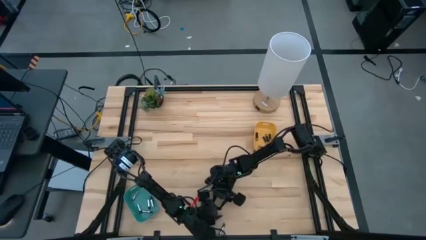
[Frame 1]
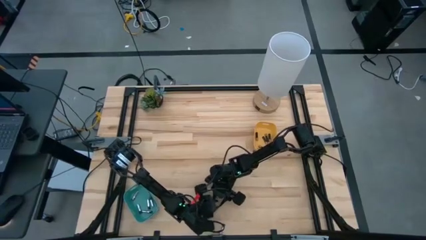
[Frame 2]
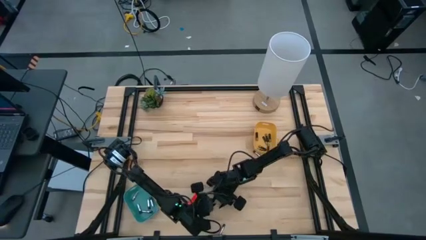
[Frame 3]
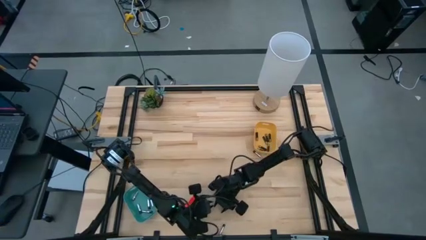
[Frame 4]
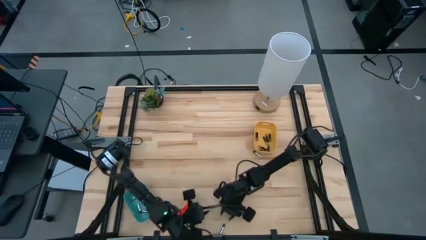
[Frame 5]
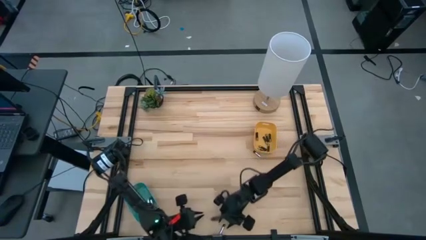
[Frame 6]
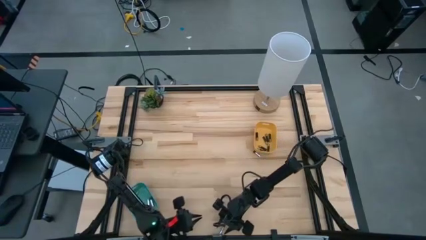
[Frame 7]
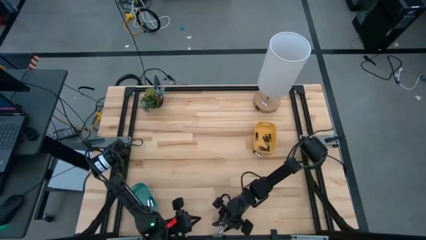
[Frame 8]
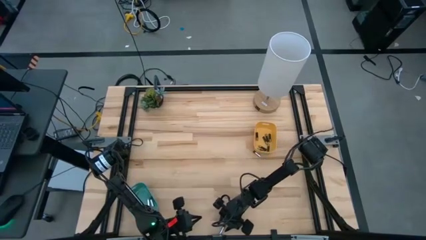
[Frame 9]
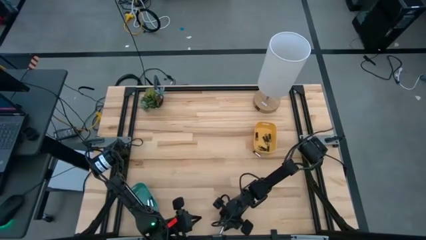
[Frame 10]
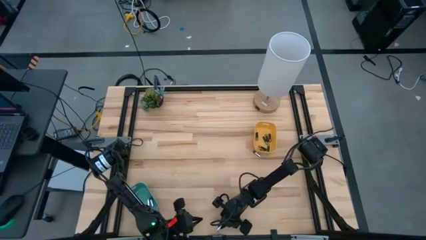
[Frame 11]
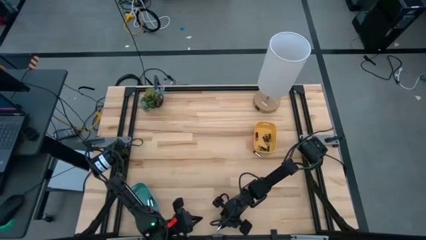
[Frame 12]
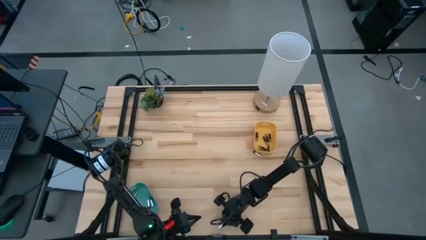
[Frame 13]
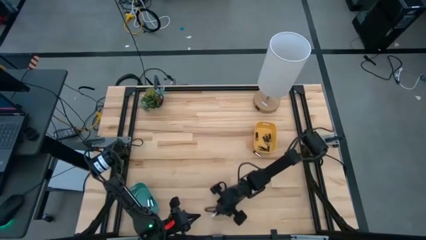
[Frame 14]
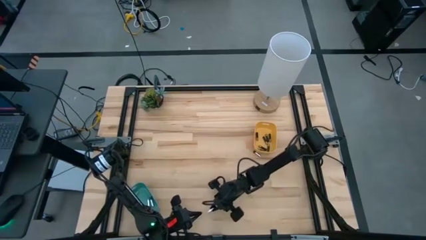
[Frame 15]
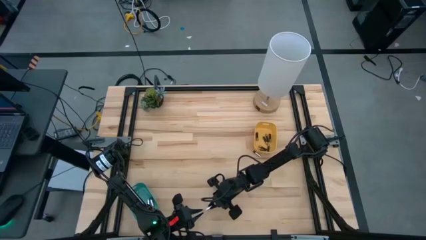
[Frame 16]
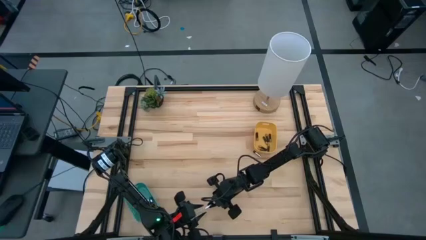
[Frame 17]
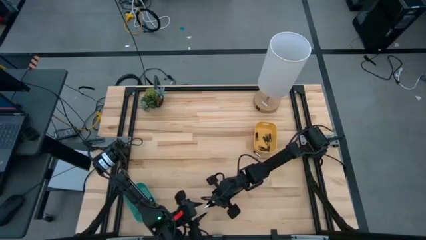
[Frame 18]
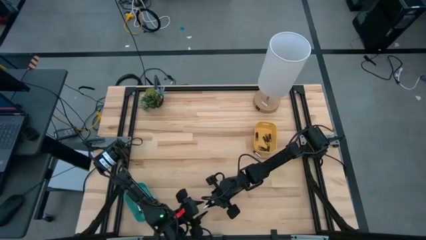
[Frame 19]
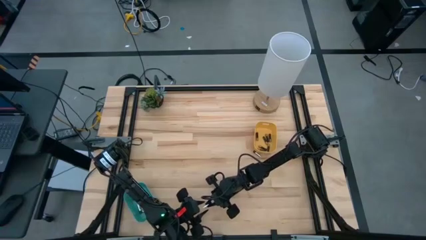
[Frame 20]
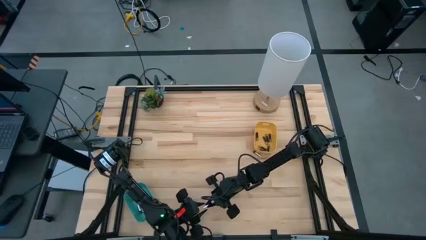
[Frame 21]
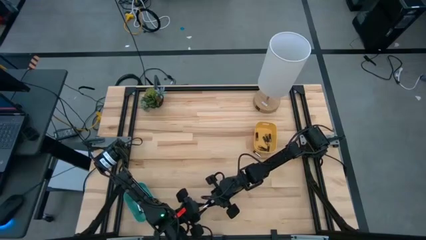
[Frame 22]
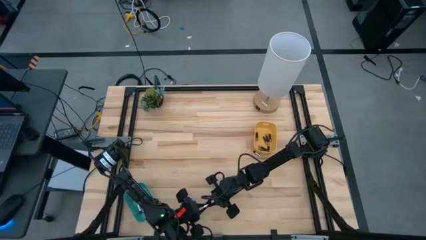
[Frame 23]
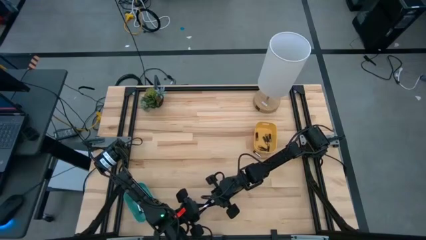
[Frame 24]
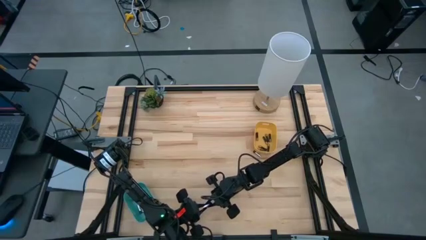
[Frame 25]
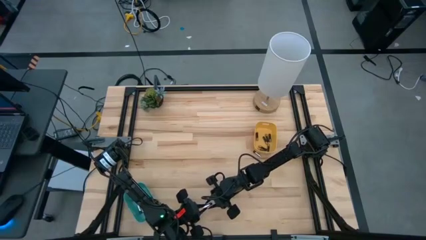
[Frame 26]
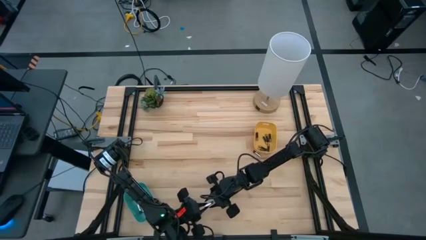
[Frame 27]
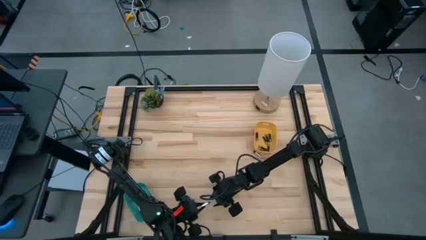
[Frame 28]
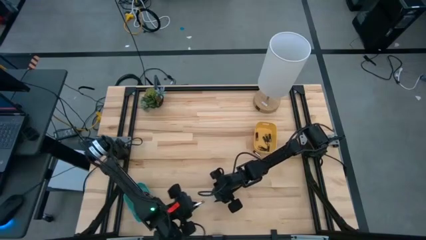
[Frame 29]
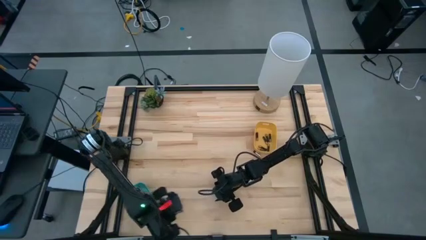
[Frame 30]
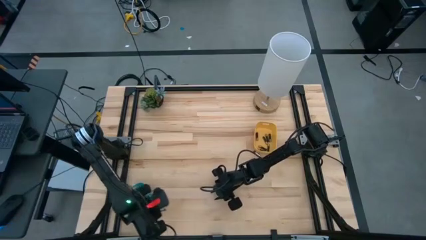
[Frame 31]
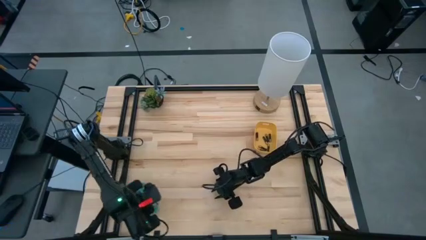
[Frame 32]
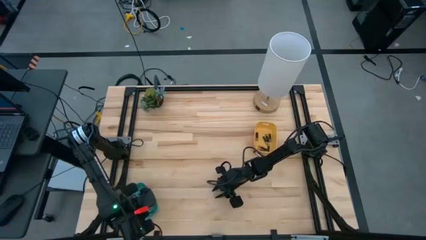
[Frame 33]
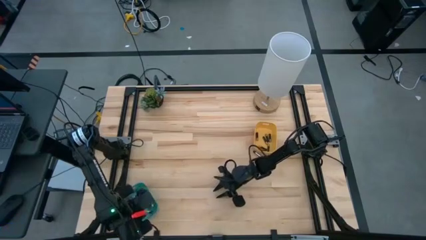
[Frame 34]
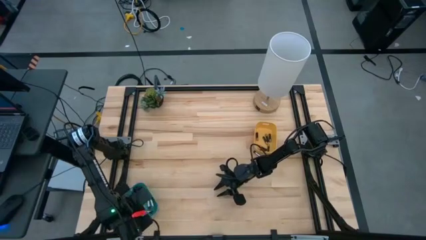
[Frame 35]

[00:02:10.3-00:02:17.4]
Task: Sort batteries
Put the silver battery into the blue bin

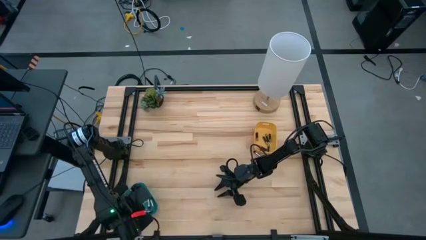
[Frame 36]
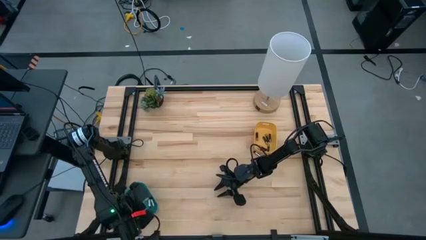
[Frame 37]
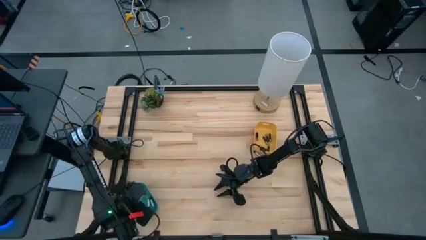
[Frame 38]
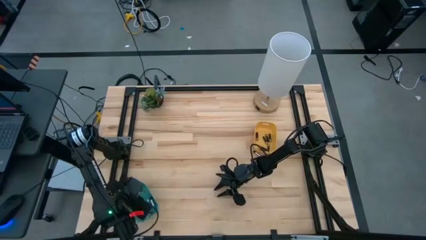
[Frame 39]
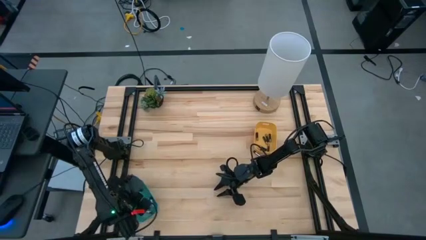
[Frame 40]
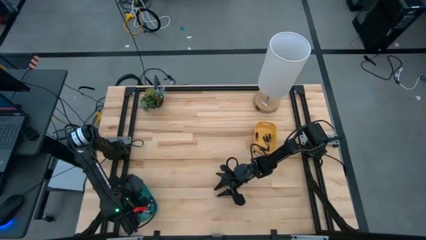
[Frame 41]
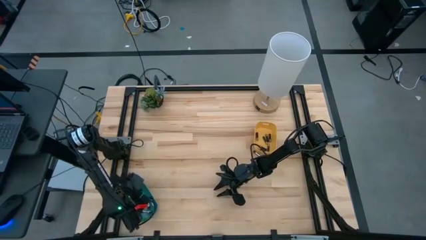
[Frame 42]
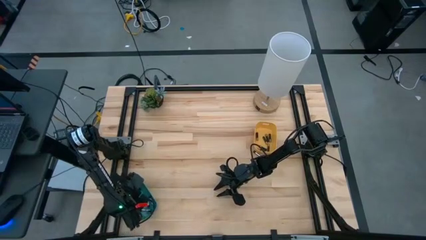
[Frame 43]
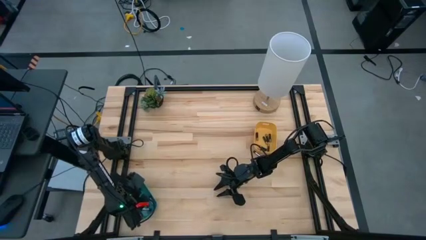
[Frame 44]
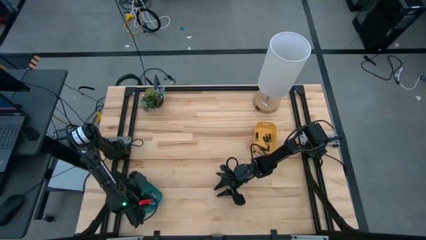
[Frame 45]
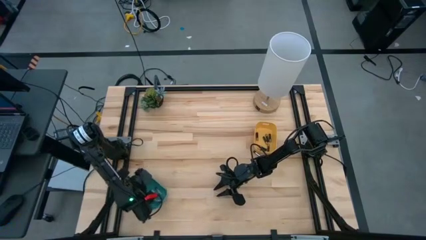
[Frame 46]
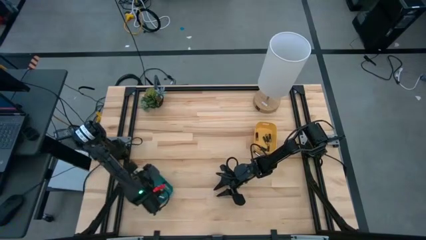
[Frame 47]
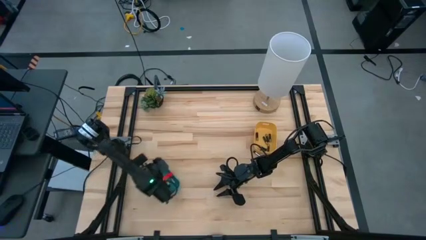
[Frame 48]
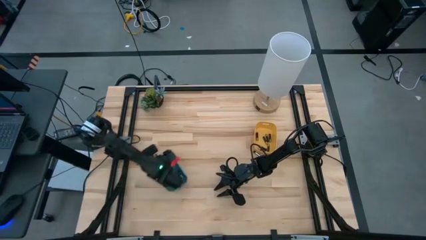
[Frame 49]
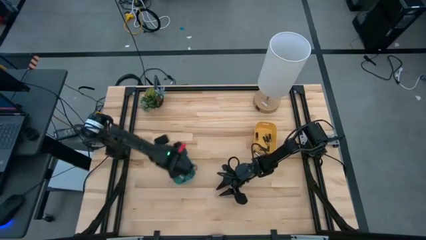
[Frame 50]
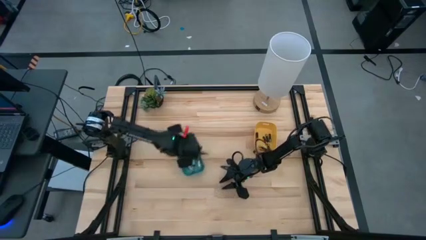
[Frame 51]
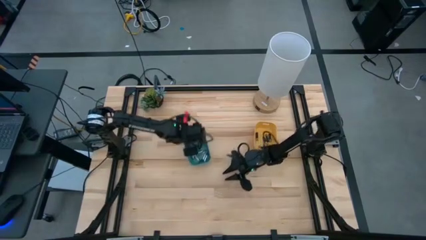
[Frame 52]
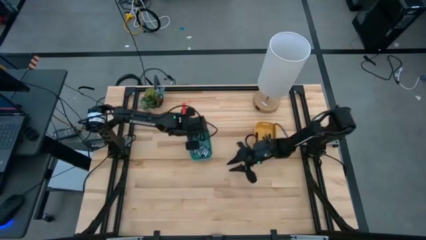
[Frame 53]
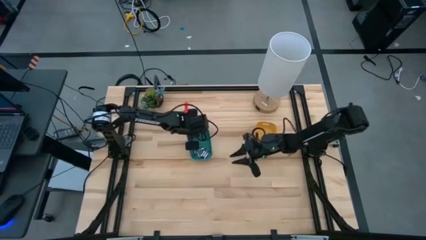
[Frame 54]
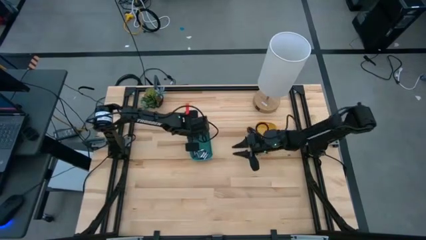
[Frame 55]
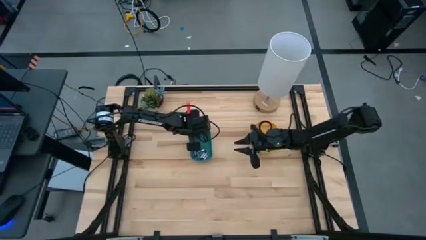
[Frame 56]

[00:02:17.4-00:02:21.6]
Move the blue bin to the center of the table

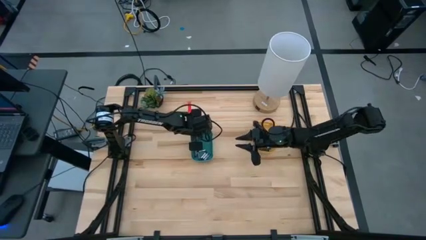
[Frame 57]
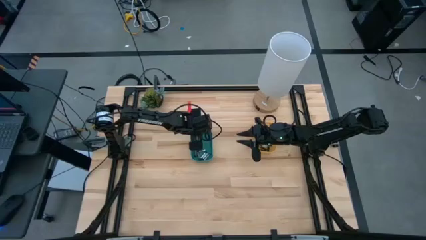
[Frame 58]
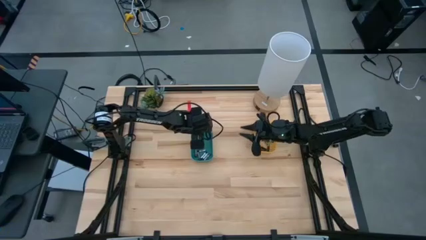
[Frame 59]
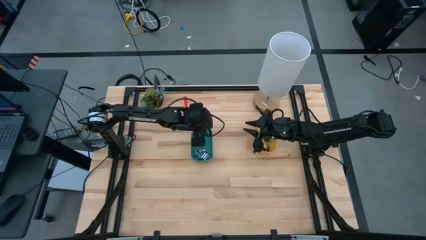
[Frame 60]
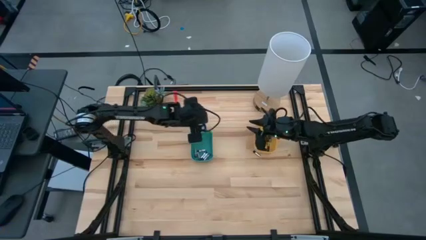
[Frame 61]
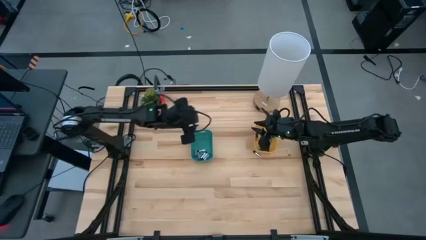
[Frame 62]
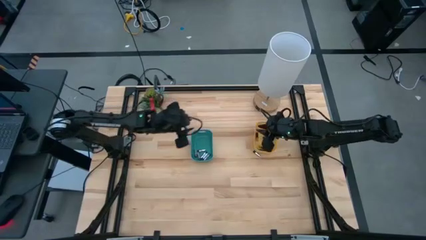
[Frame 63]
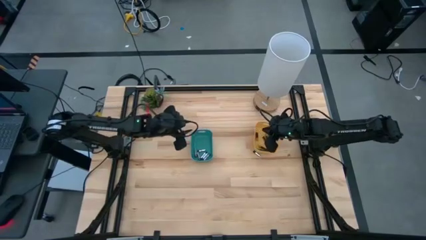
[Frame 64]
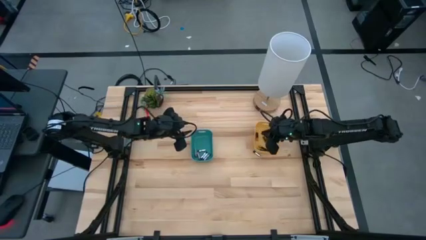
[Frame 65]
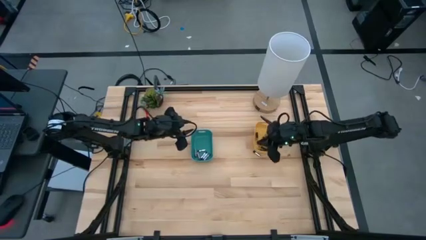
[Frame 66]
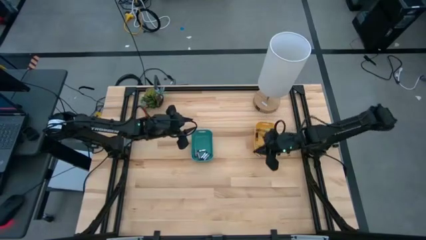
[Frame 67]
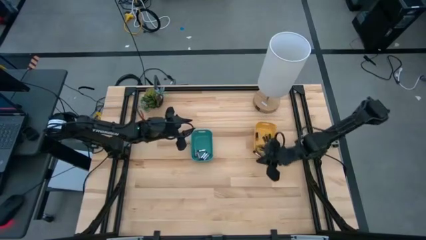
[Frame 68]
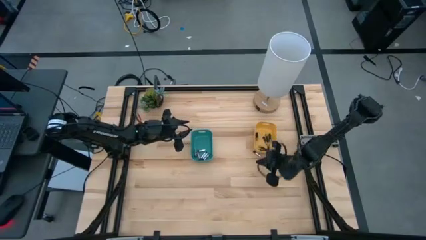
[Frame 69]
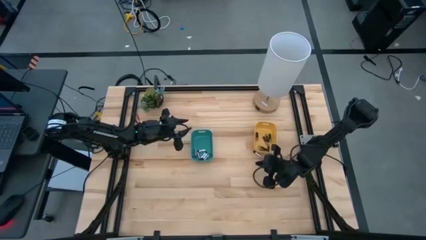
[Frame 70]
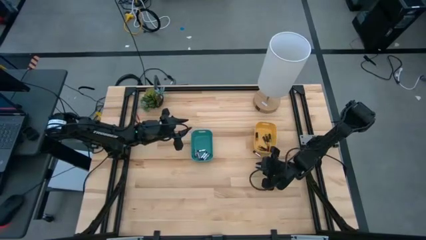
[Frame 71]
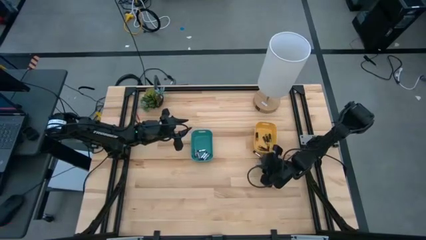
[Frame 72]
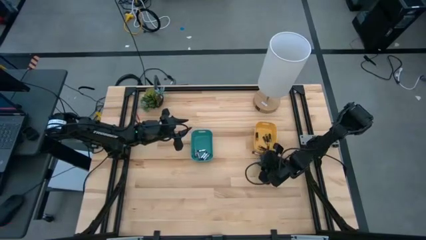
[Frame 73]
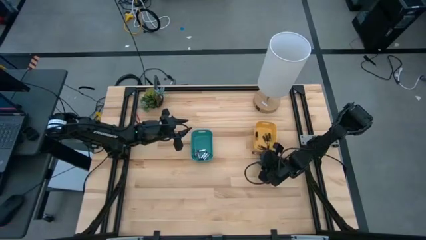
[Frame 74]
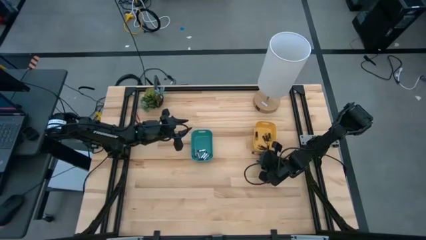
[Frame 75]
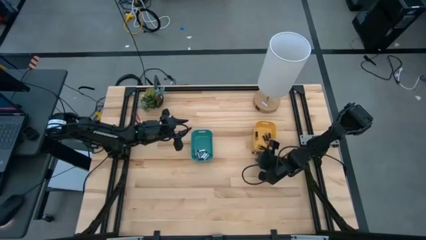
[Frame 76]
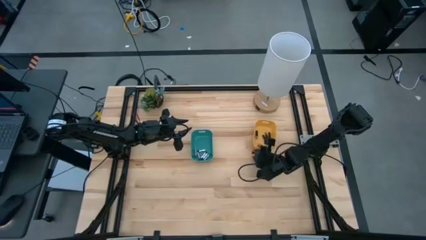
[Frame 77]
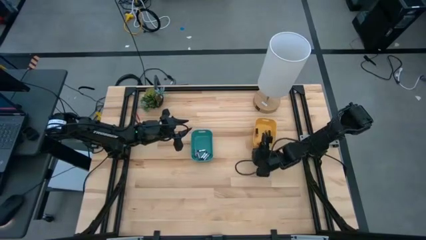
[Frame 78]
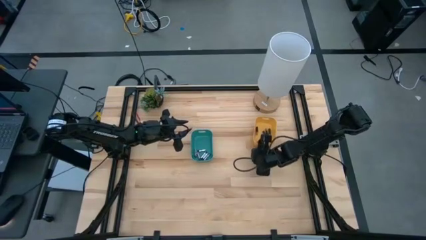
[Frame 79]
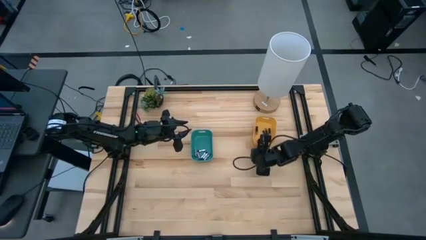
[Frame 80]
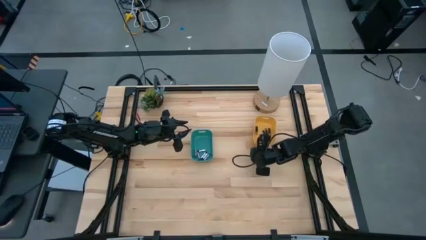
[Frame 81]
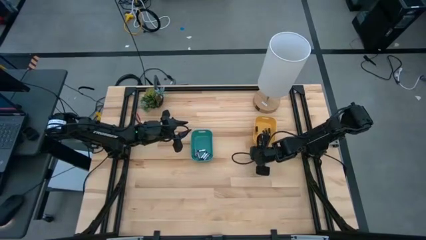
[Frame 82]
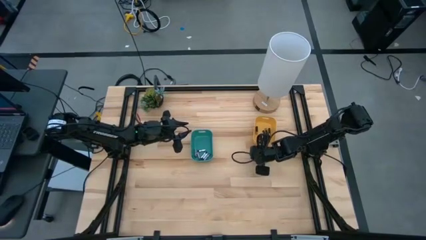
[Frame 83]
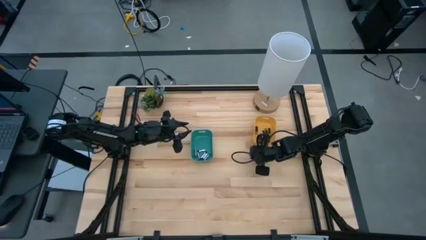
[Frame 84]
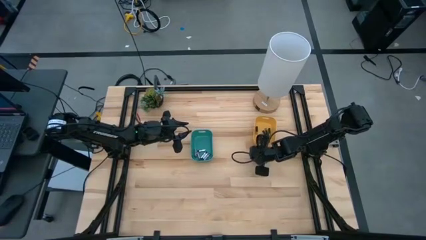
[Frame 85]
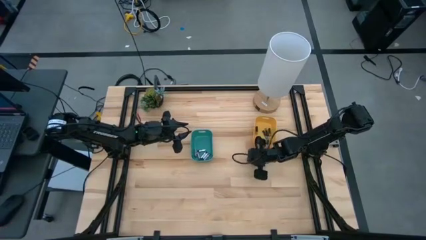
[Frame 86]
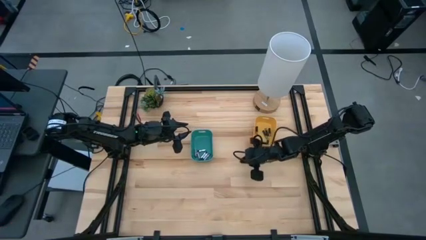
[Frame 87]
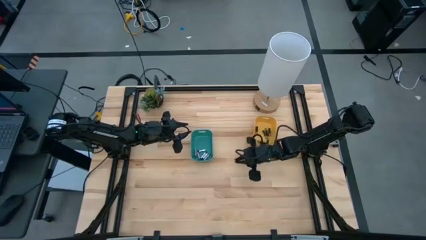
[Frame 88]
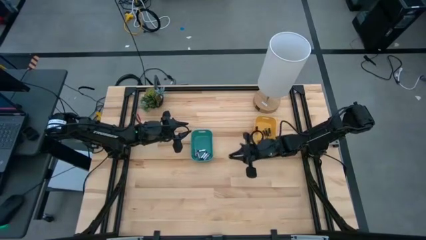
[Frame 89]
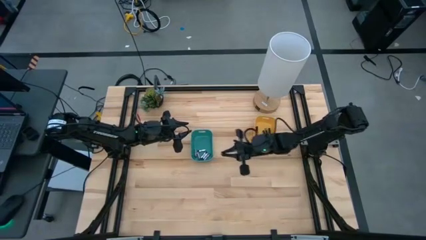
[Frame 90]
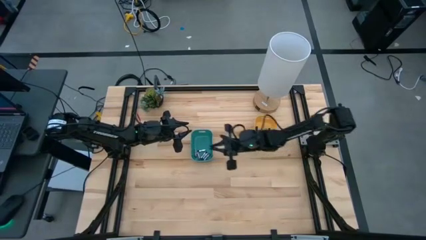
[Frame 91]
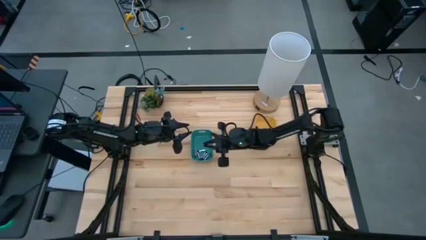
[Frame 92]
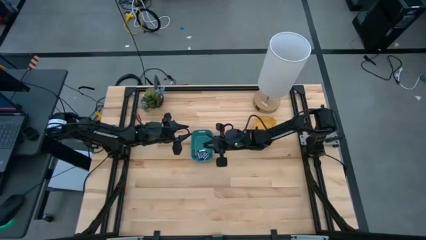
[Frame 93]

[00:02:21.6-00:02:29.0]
Put the silver battery into the blue bin
